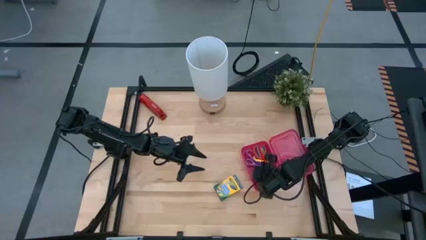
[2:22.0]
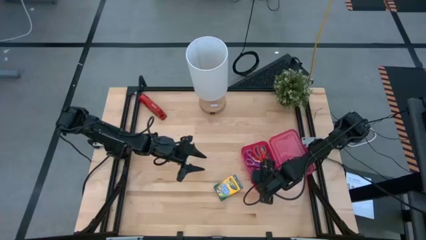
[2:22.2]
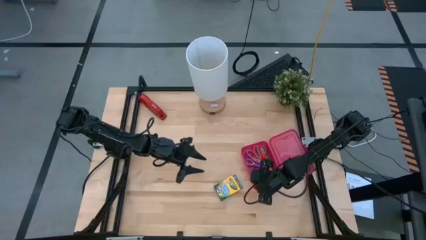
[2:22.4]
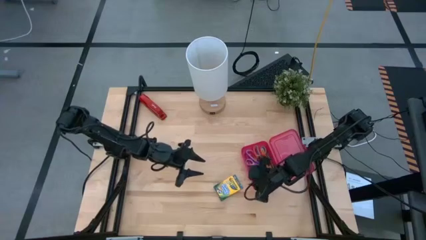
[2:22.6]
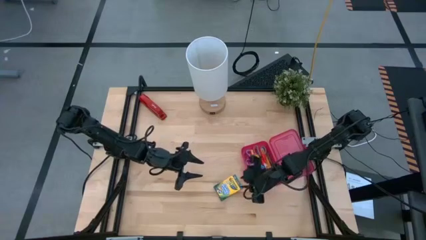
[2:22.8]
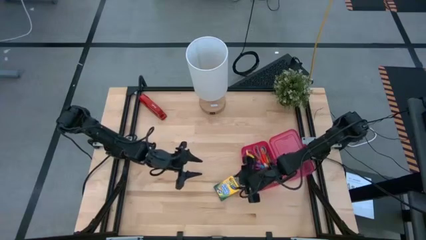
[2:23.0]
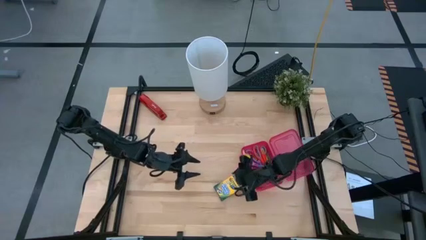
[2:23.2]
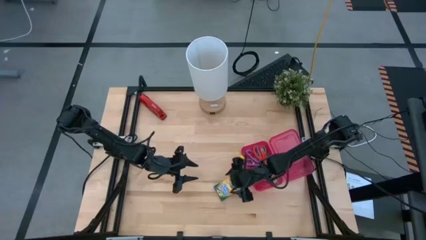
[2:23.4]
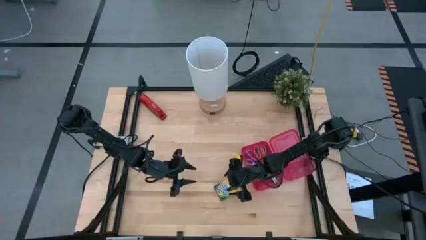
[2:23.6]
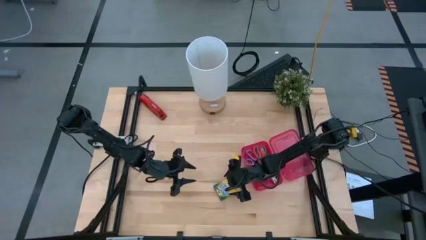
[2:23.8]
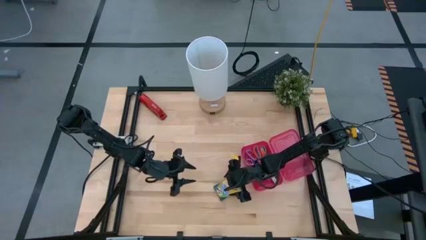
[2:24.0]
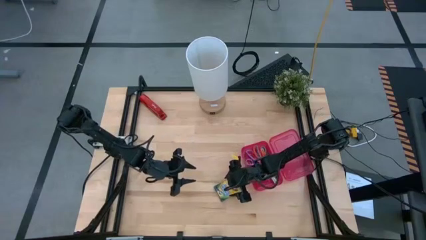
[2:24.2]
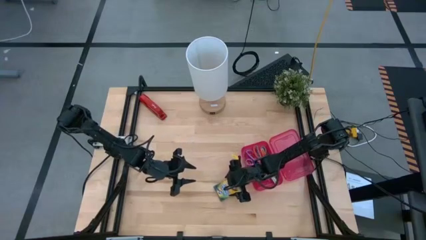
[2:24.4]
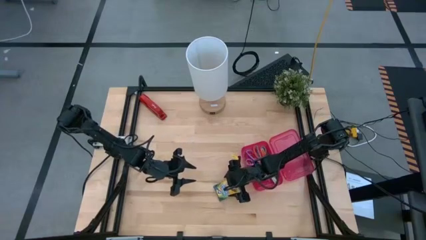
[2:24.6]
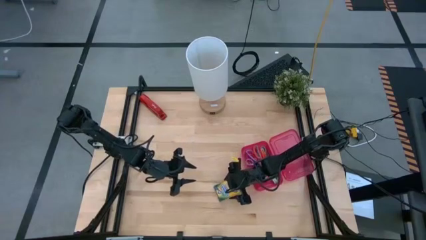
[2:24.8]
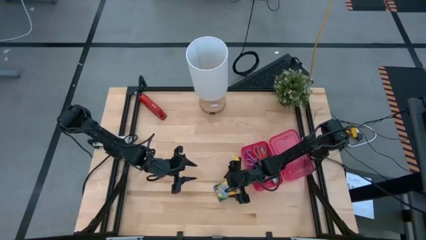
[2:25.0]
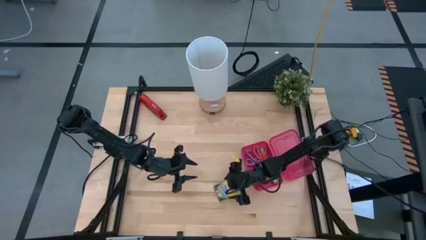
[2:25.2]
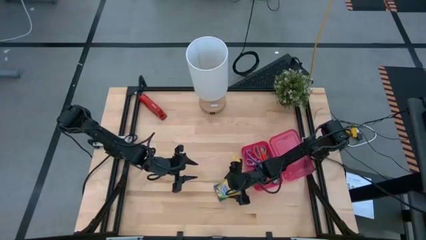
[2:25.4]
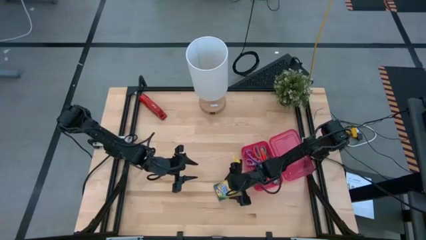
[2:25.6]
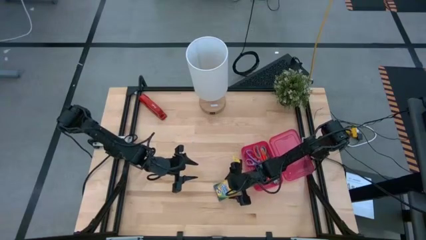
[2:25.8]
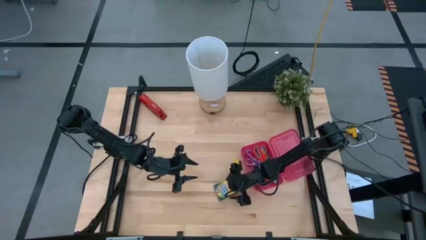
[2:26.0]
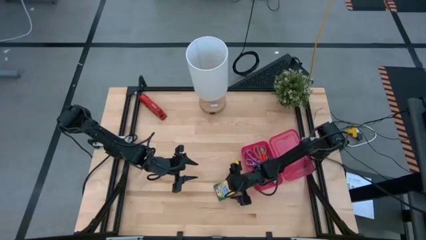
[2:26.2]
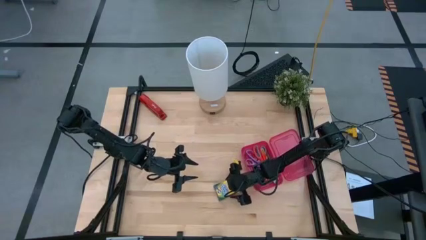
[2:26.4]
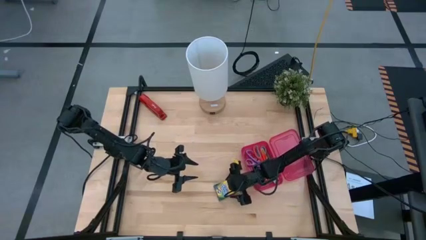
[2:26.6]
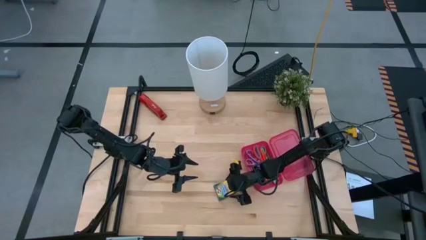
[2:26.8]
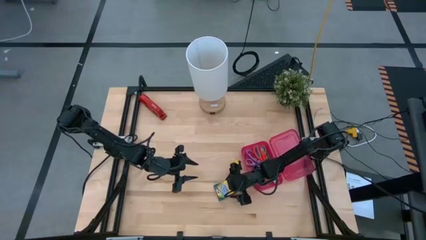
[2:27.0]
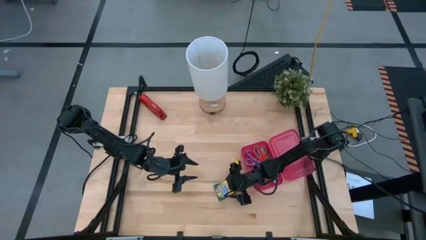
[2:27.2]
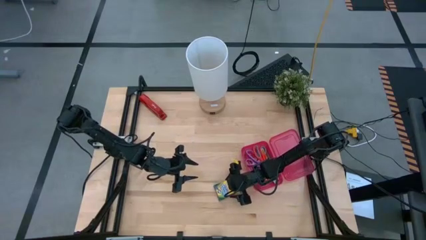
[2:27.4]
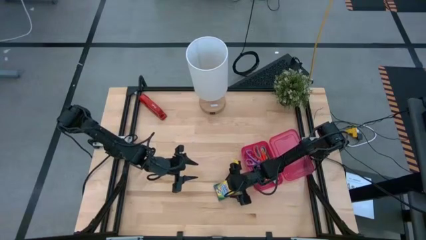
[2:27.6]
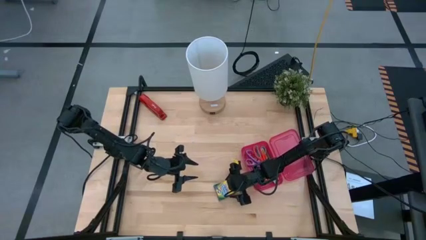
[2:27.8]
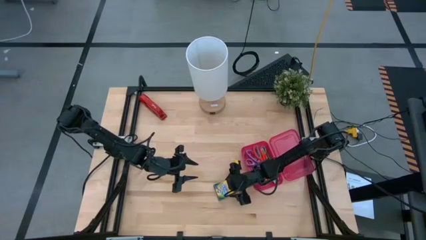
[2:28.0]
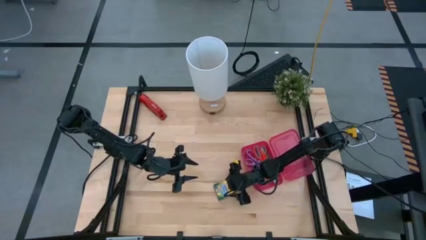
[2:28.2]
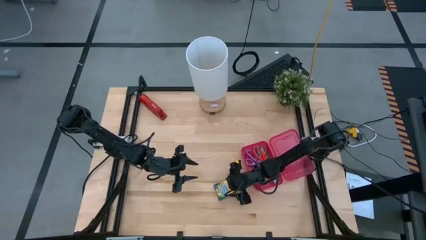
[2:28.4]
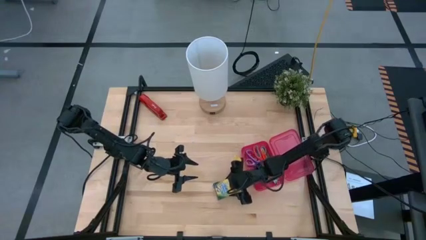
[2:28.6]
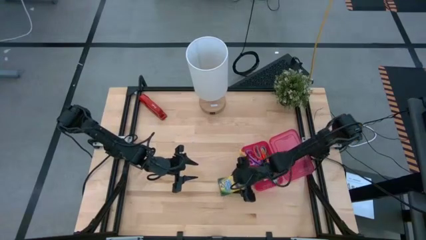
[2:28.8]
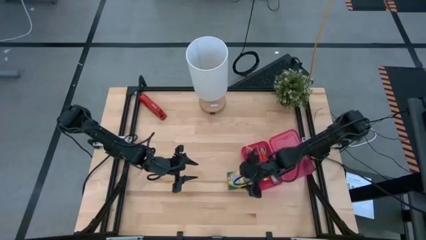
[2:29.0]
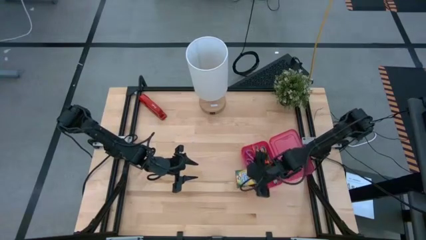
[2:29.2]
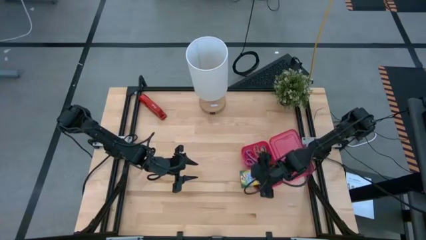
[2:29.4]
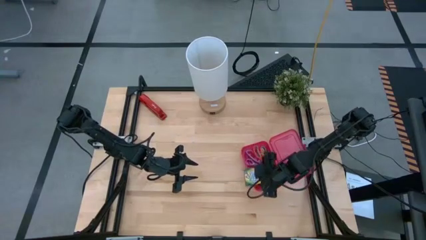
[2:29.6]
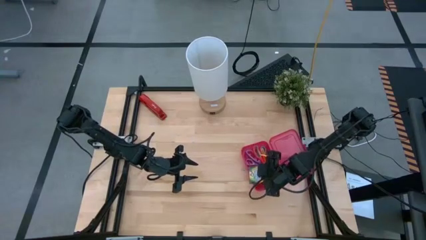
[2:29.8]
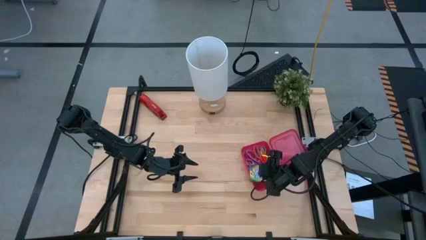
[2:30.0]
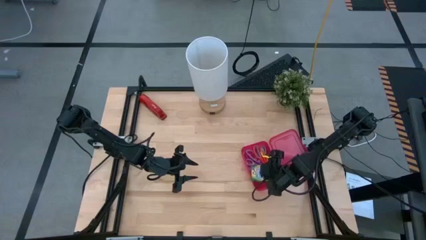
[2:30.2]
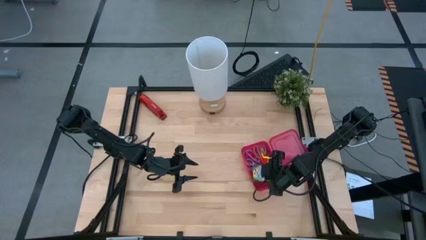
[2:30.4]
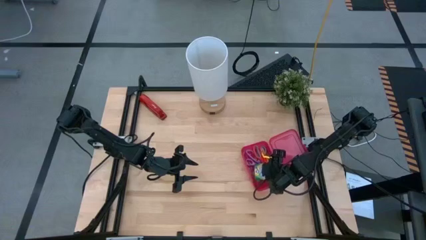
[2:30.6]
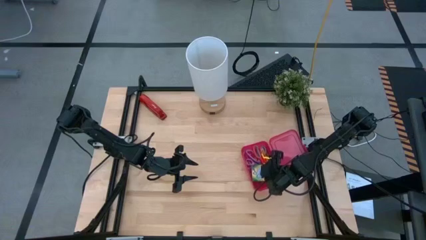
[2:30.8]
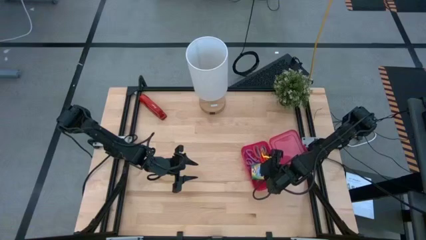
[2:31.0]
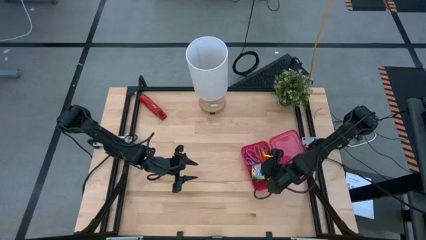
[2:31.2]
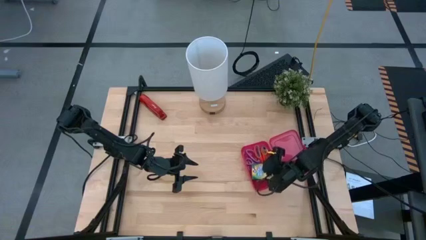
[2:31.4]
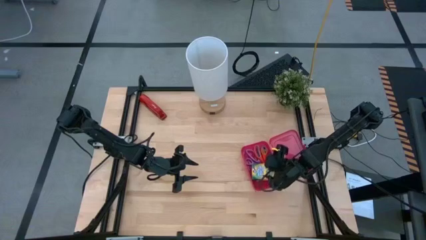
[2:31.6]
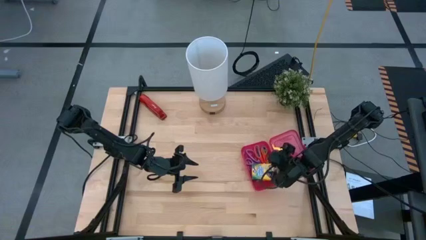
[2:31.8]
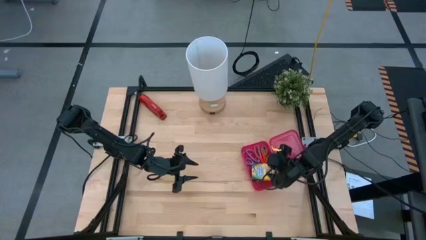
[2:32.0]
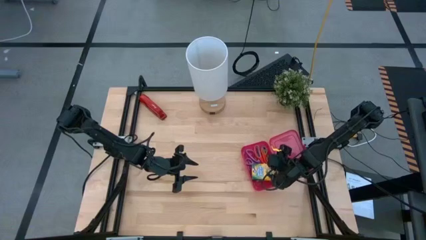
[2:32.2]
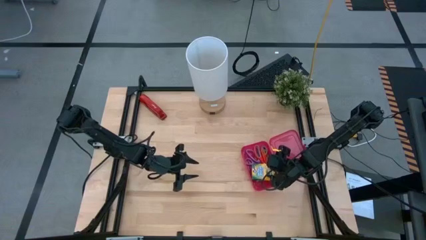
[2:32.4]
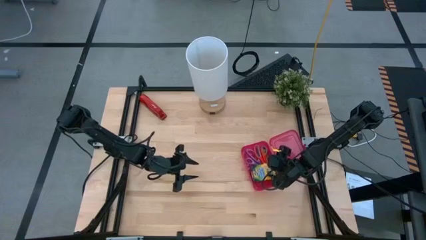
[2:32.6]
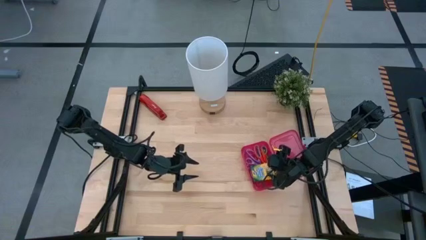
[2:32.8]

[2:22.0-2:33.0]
Task: Pack school essentials
Put the crayon box into the pink supply box

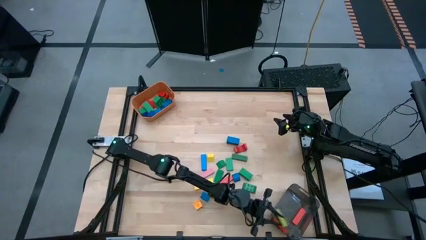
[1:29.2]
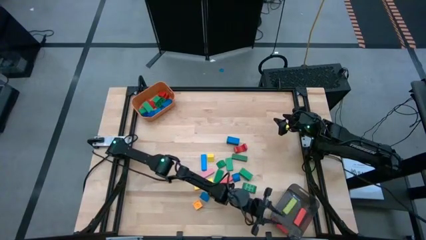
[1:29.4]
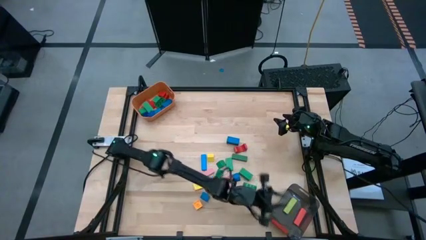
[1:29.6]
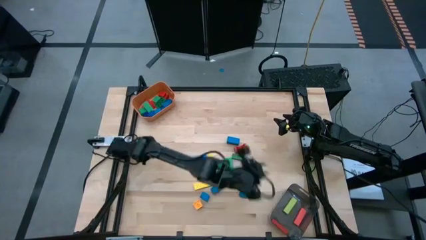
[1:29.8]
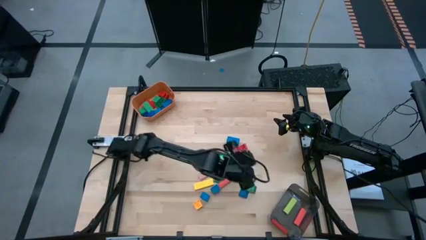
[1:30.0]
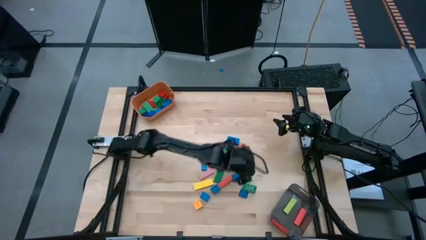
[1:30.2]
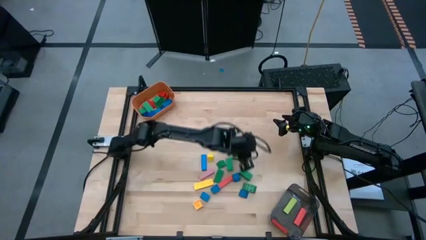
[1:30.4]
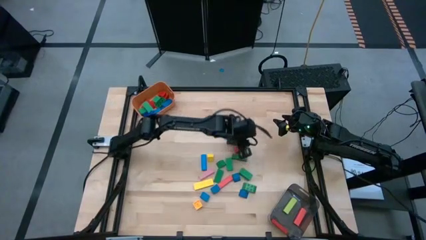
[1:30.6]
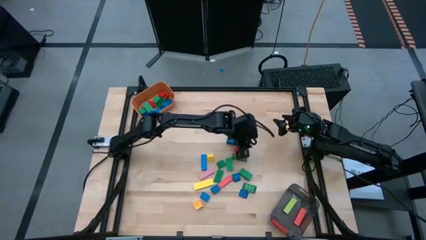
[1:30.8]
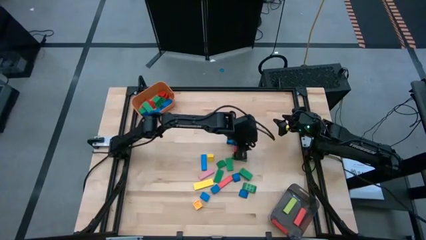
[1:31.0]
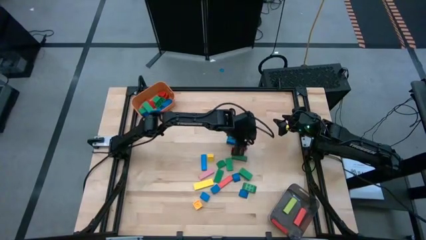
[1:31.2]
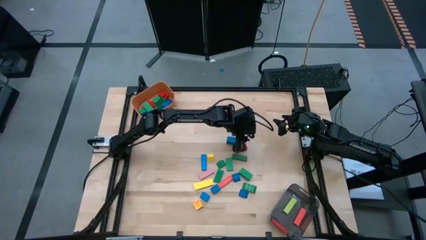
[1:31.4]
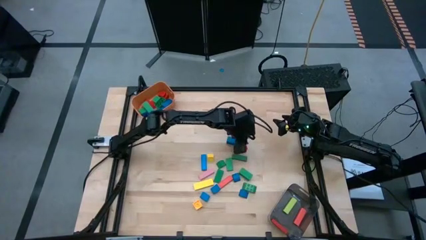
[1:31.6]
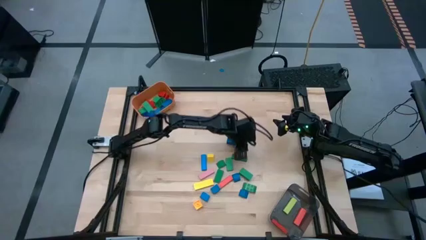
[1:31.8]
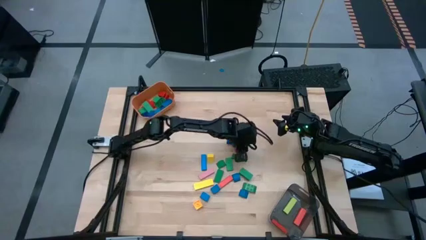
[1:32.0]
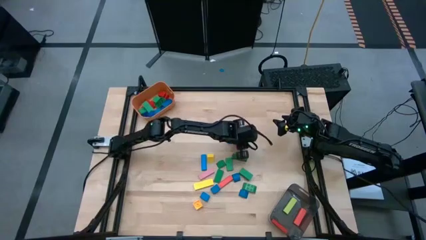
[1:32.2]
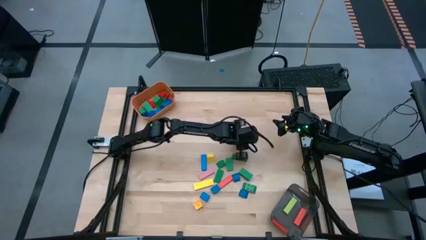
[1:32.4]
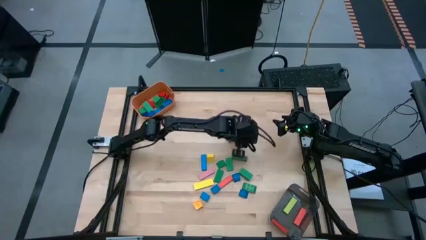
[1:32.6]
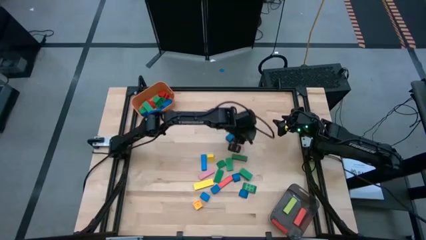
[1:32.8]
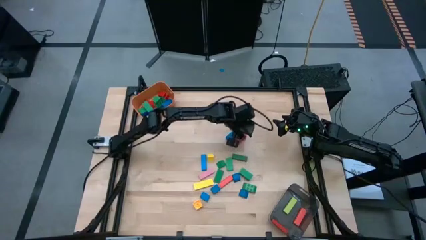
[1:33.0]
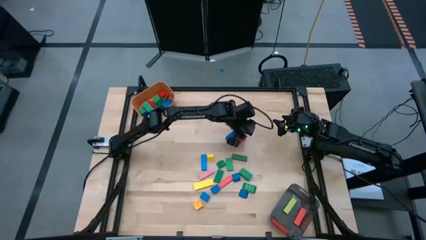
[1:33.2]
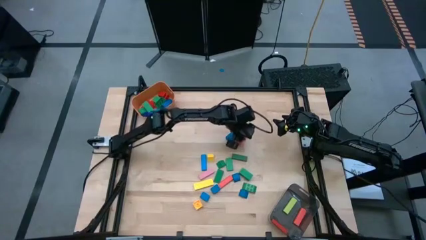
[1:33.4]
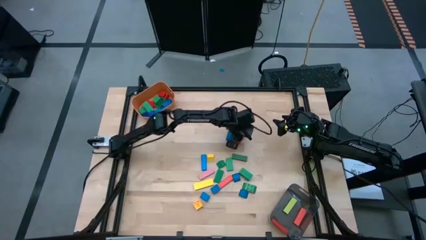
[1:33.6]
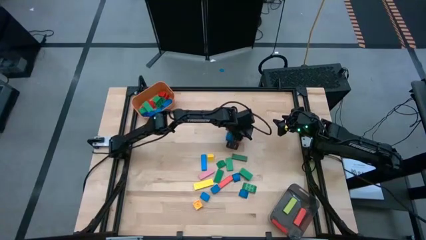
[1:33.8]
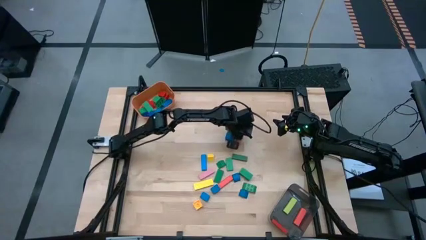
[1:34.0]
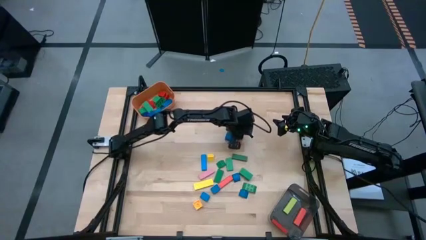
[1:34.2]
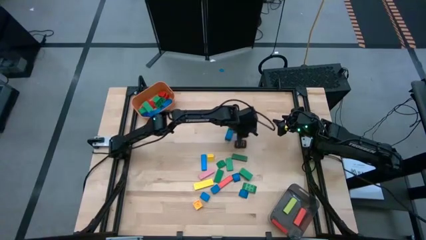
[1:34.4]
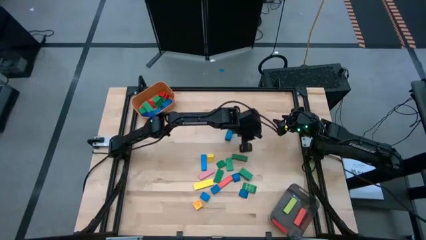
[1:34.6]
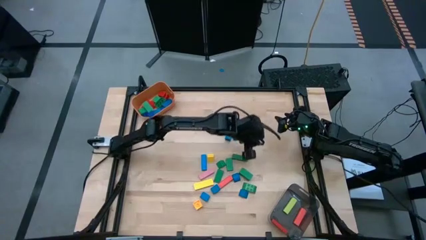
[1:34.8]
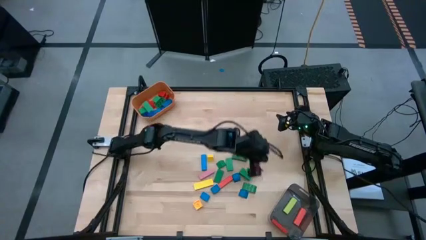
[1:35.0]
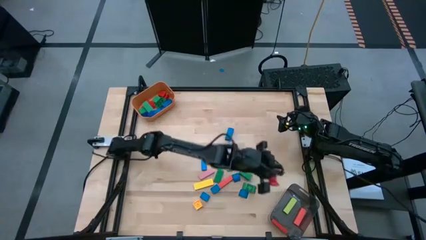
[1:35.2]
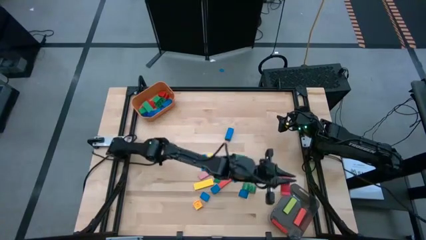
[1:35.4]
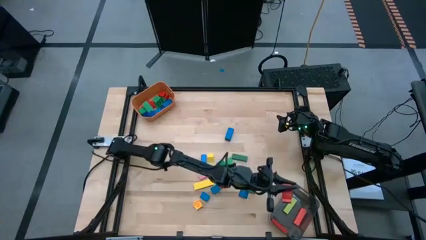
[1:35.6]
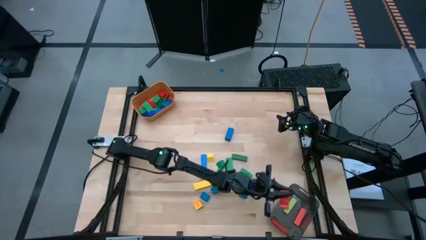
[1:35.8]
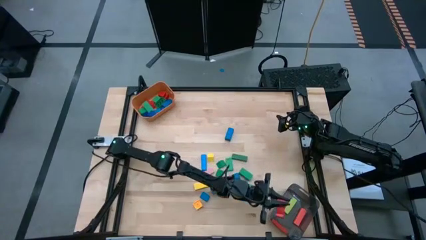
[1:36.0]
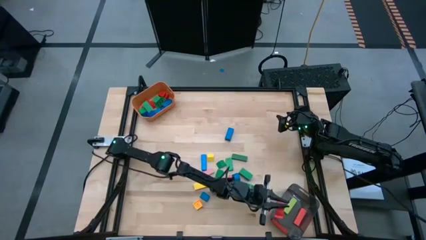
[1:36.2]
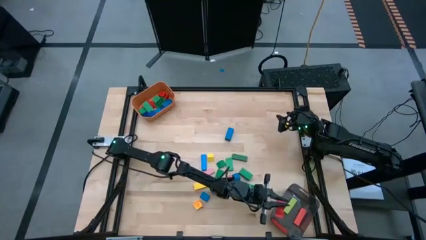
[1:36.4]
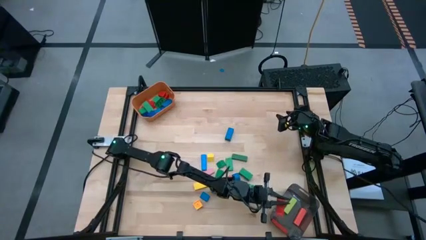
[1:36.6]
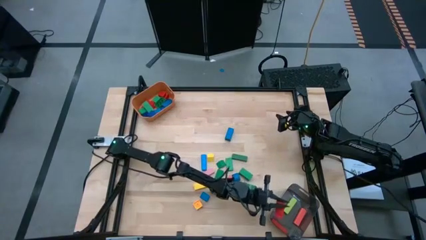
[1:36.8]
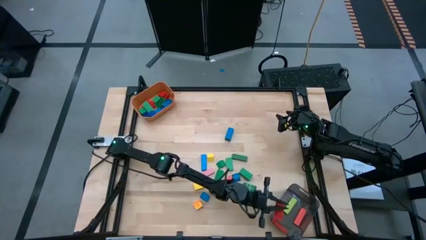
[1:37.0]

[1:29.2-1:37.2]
Task: Sort blocks by size
Put the big red block into the black bin
